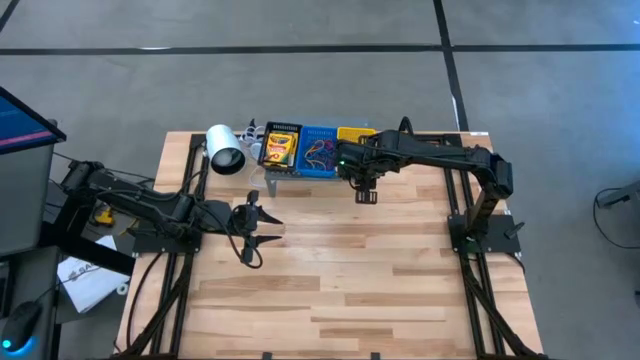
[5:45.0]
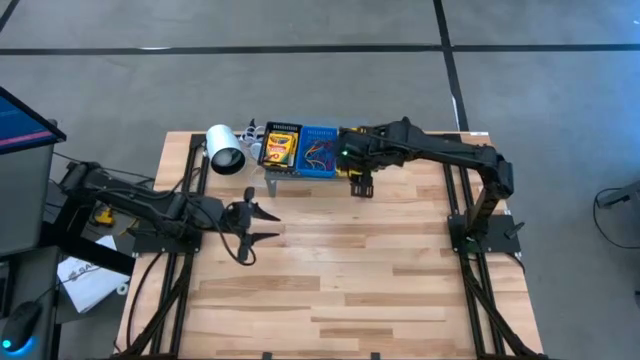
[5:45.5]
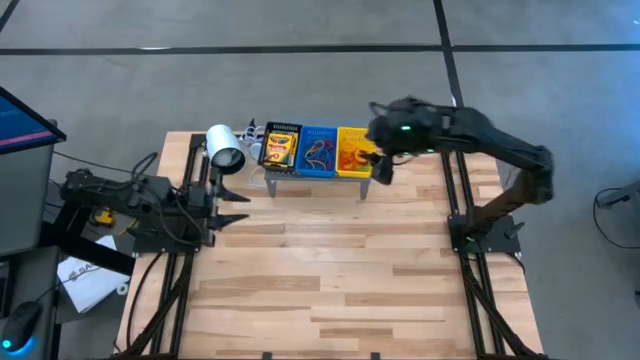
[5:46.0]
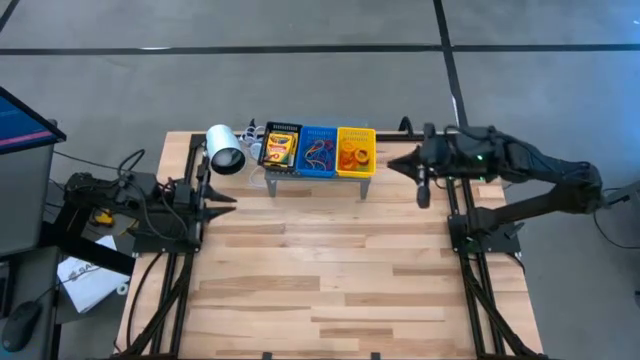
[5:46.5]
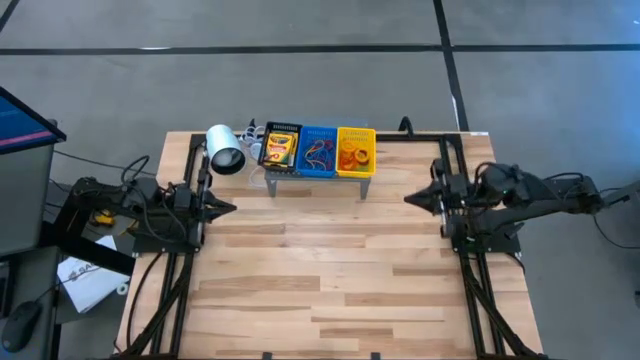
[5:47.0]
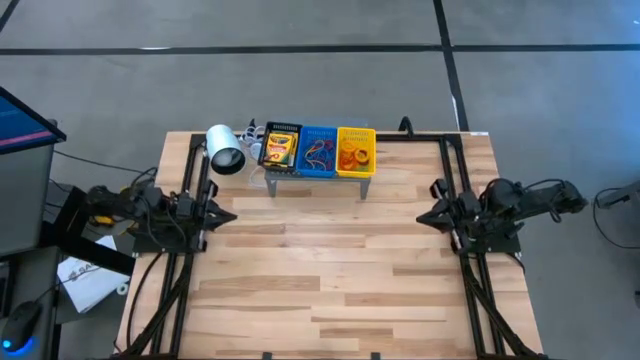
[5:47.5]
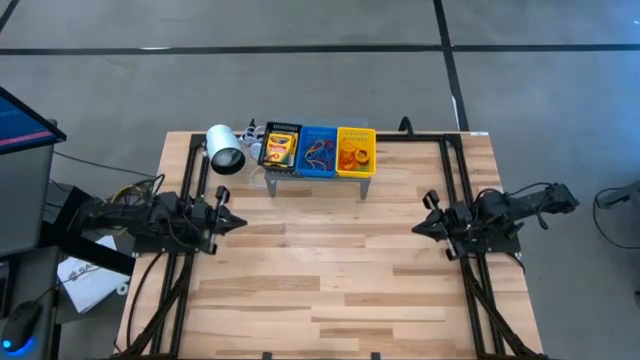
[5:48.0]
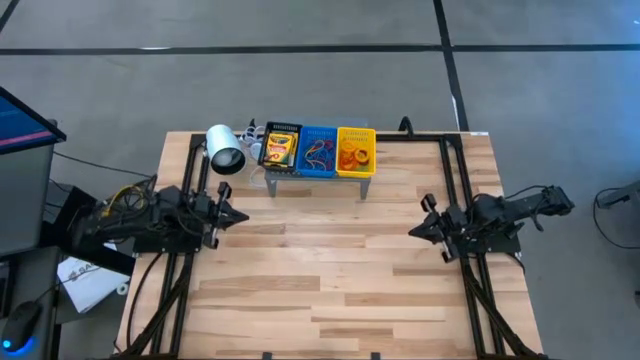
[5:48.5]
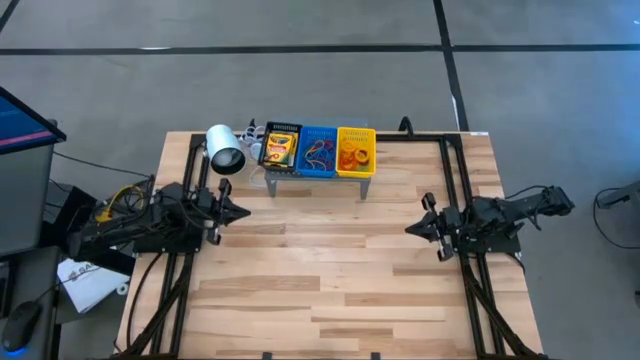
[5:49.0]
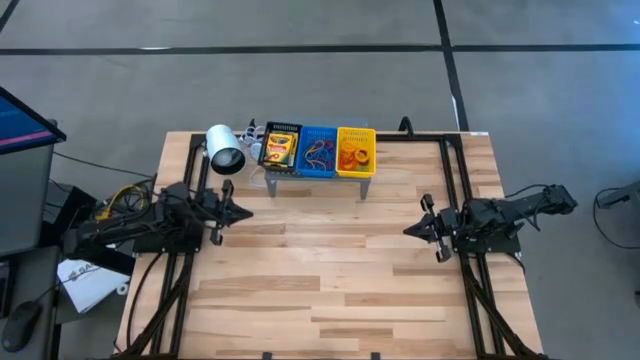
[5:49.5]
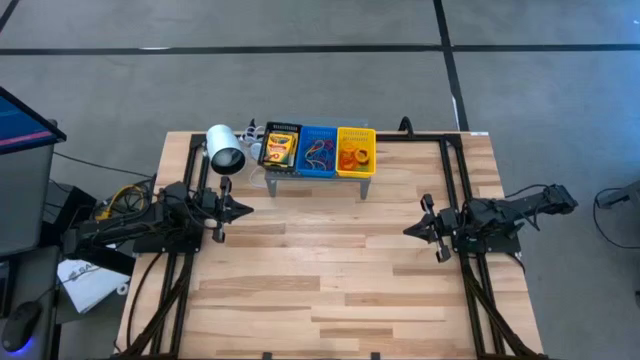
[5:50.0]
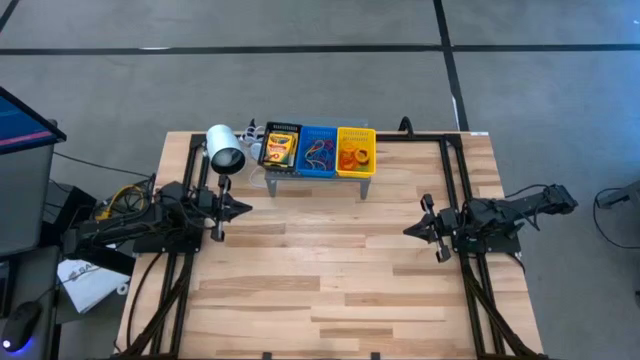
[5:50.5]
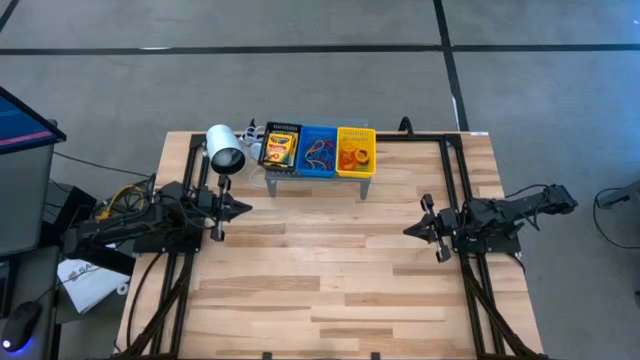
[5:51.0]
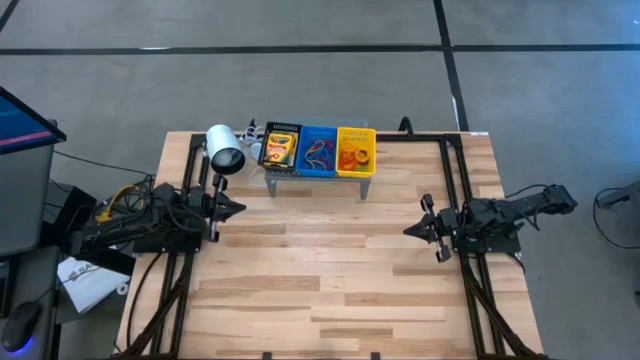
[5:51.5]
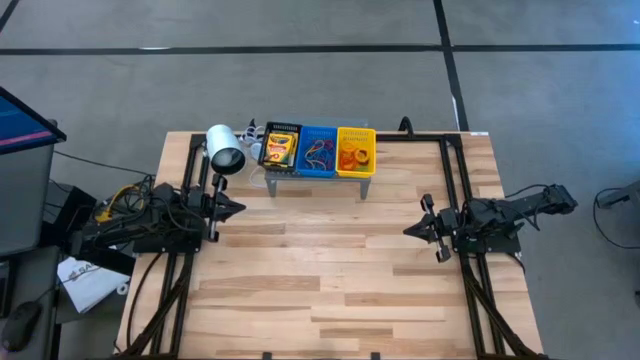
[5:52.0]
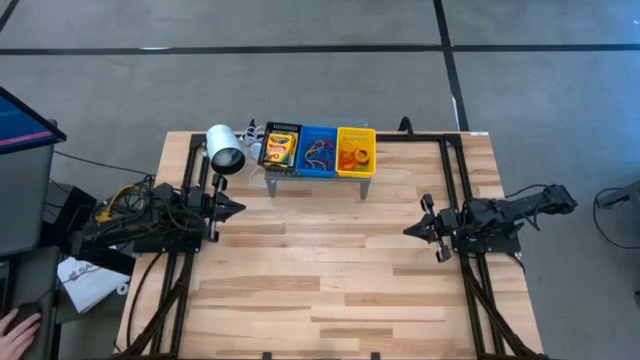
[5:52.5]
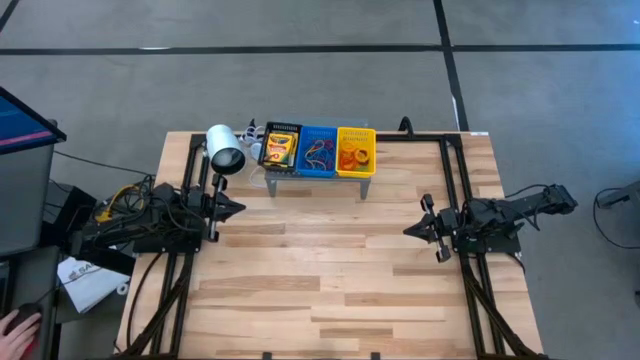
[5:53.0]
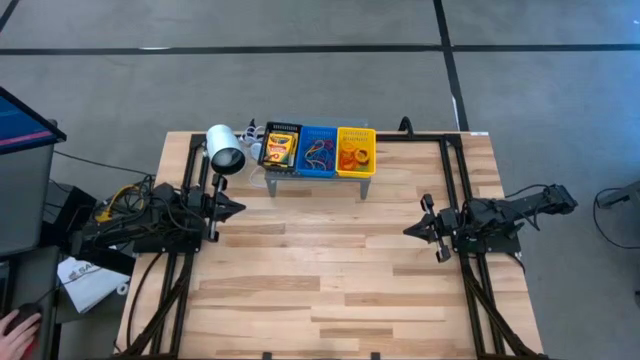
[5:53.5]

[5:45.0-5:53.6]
Task: Pick & Place Office Desk Supplies
Return to Home Position

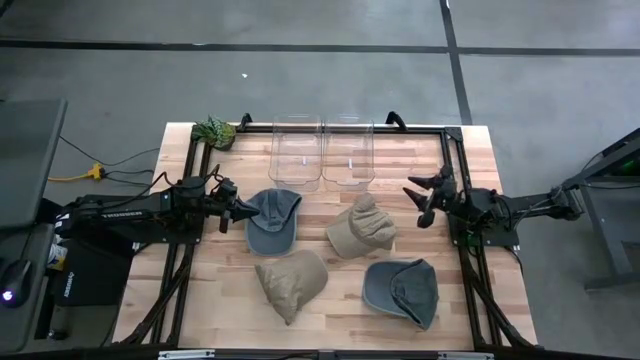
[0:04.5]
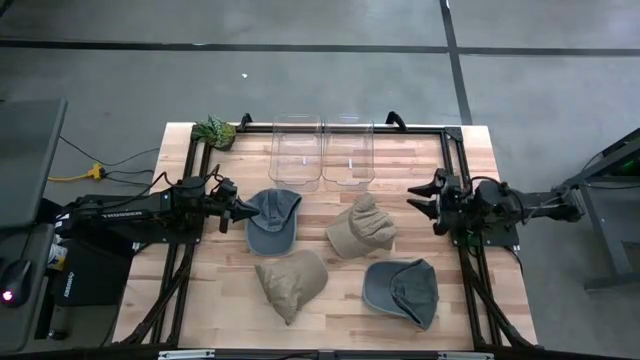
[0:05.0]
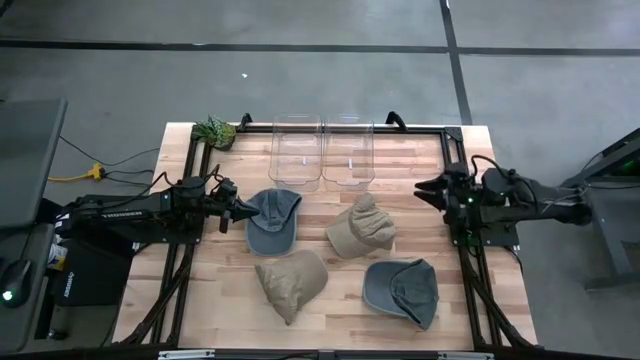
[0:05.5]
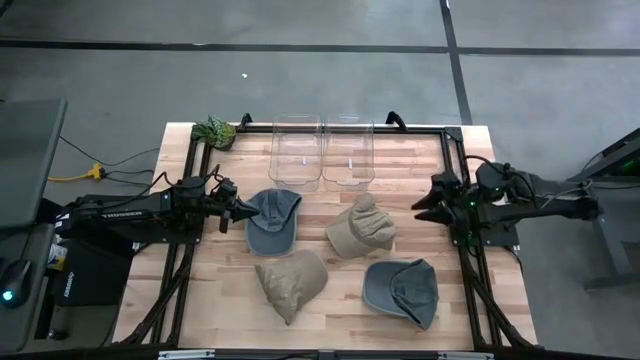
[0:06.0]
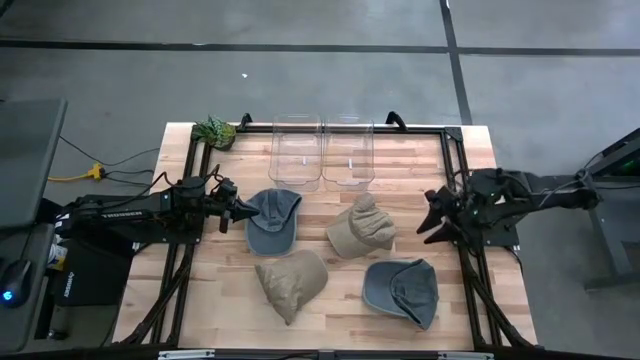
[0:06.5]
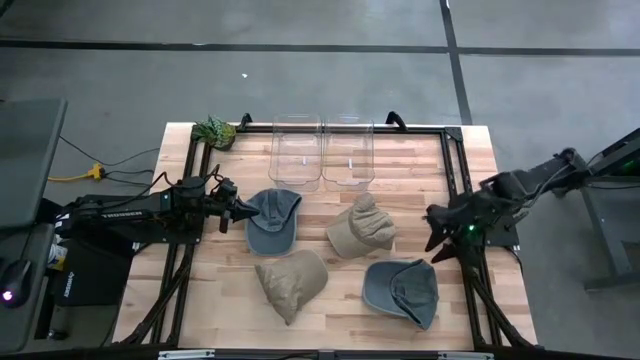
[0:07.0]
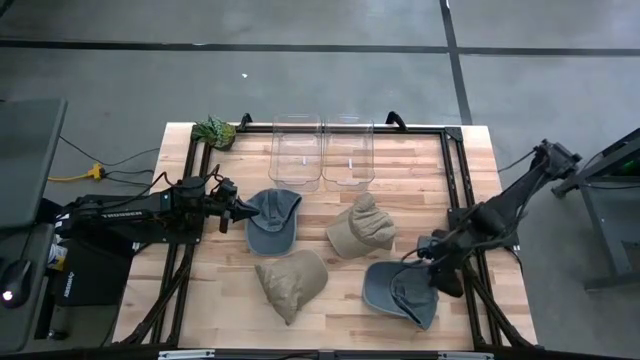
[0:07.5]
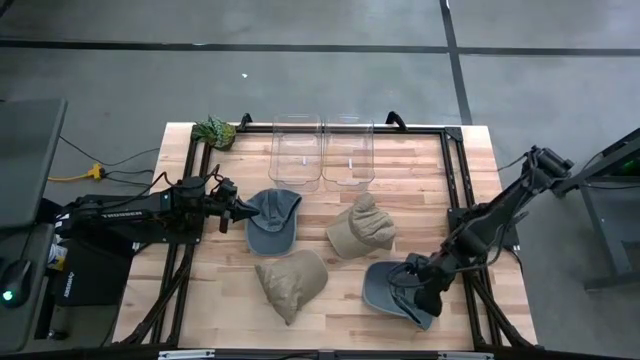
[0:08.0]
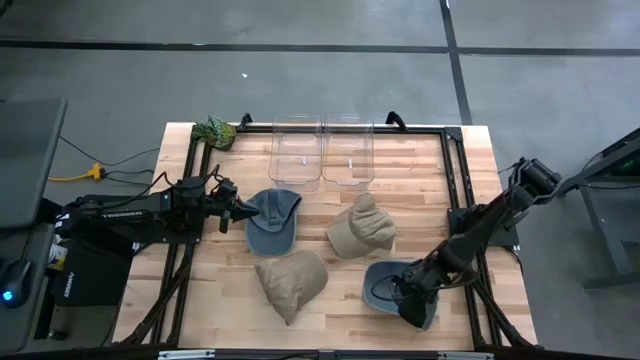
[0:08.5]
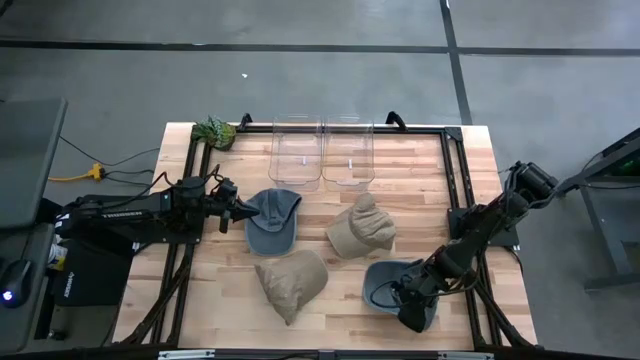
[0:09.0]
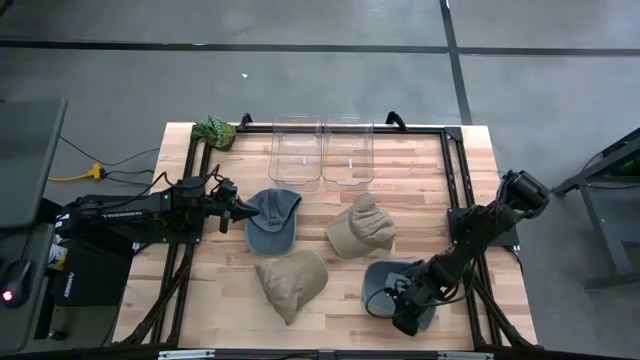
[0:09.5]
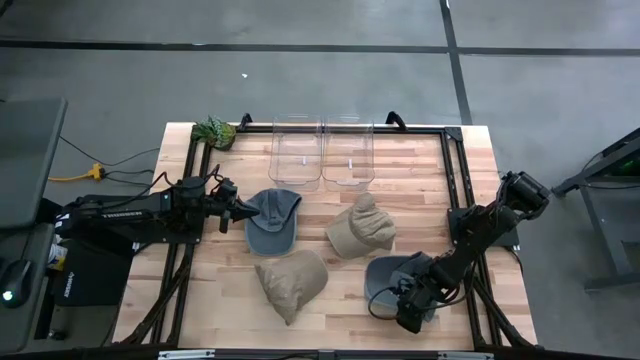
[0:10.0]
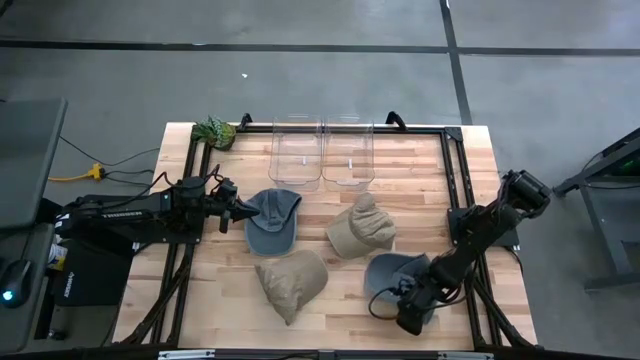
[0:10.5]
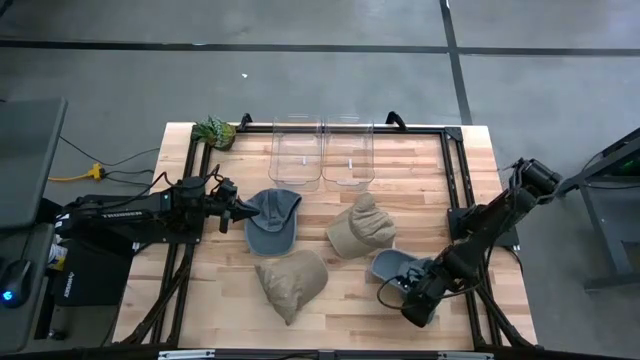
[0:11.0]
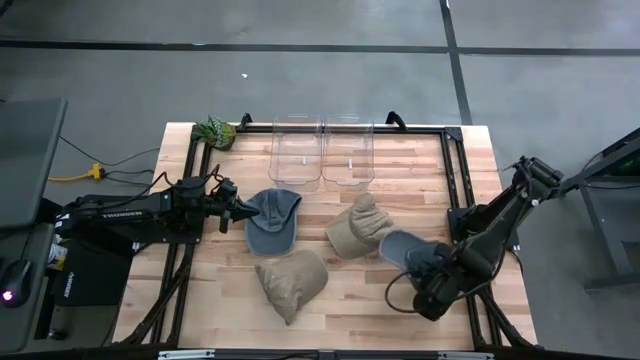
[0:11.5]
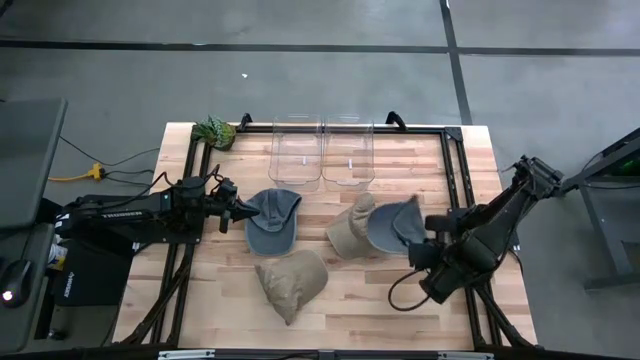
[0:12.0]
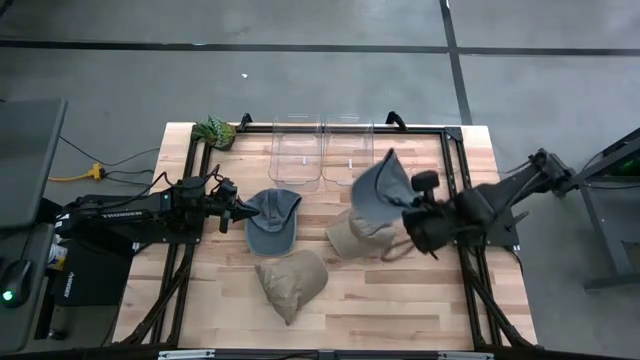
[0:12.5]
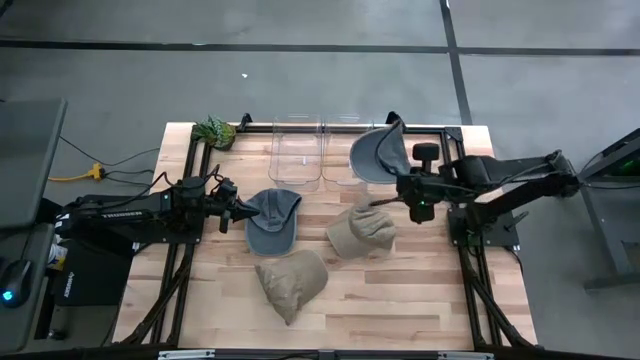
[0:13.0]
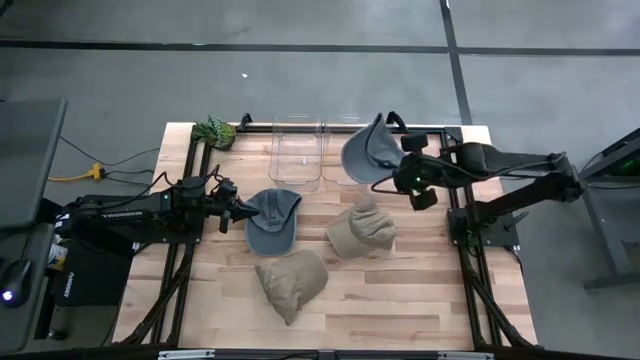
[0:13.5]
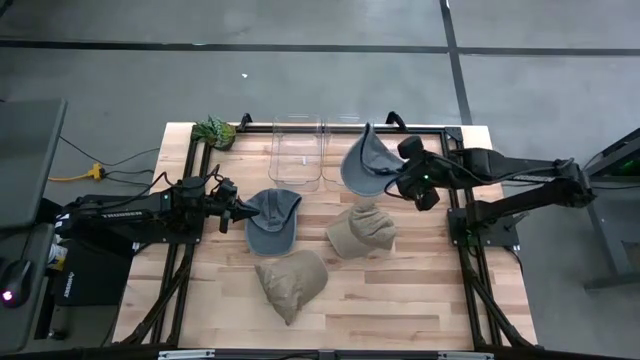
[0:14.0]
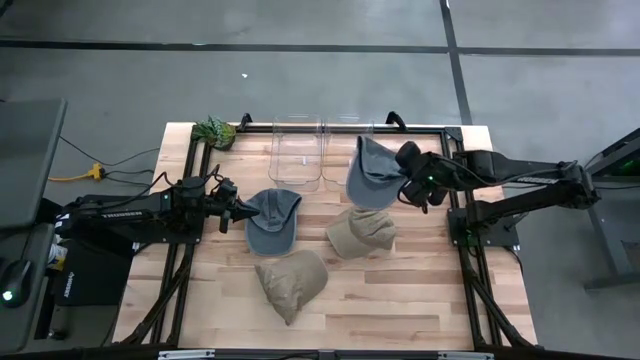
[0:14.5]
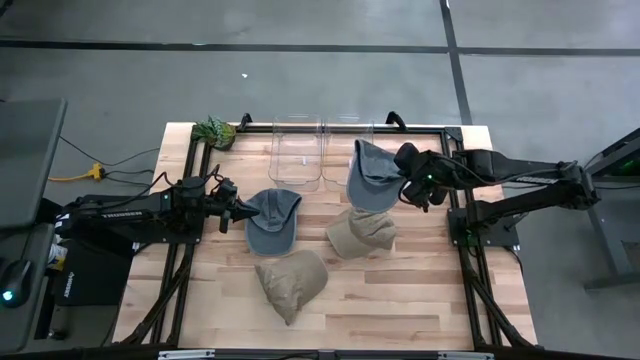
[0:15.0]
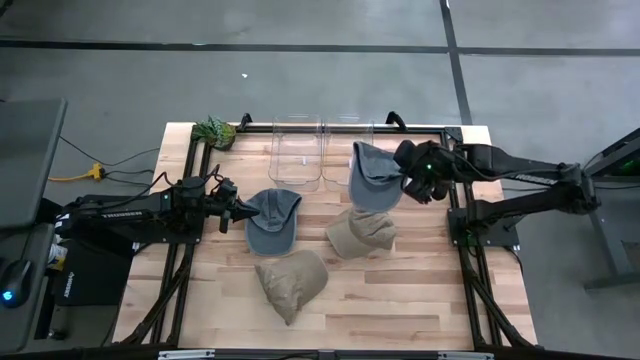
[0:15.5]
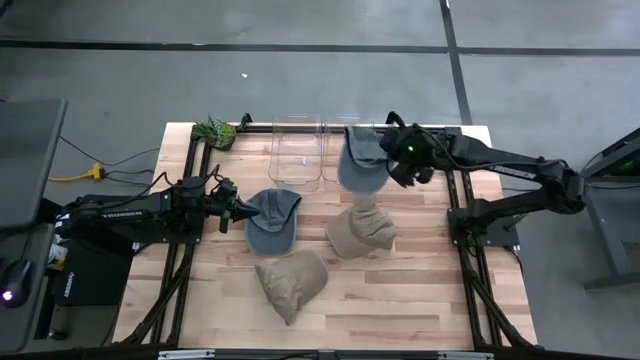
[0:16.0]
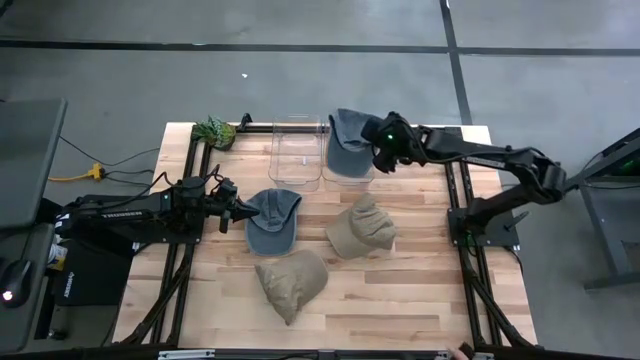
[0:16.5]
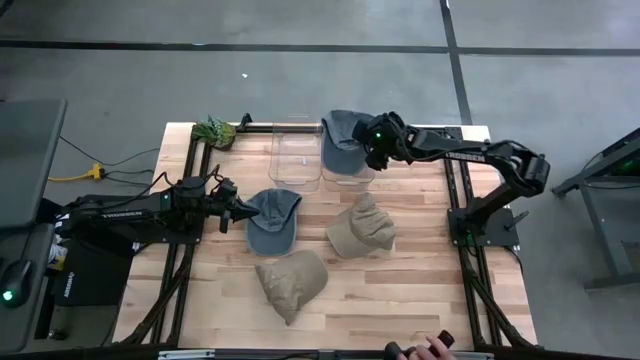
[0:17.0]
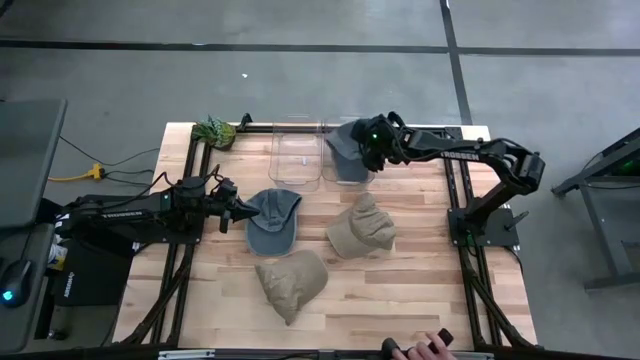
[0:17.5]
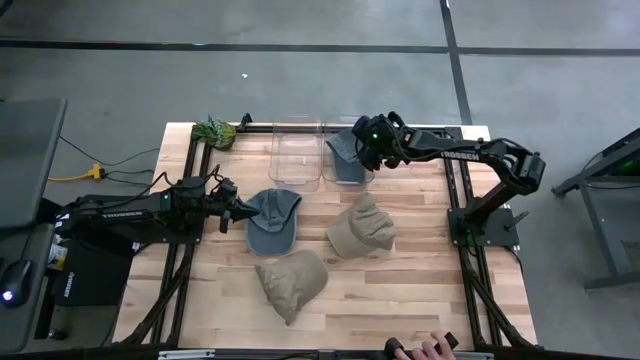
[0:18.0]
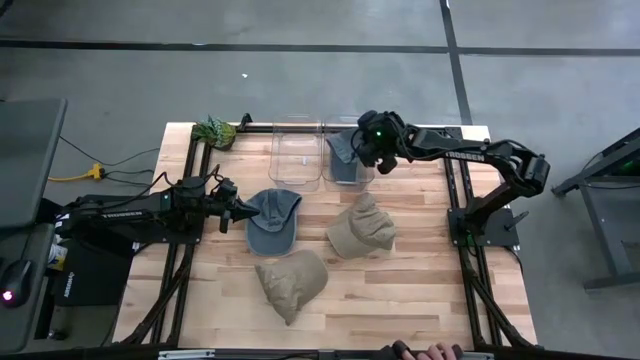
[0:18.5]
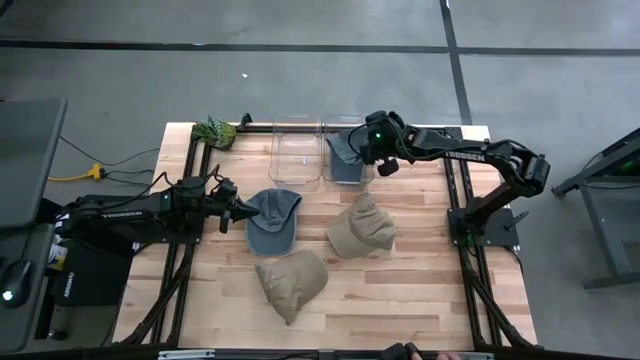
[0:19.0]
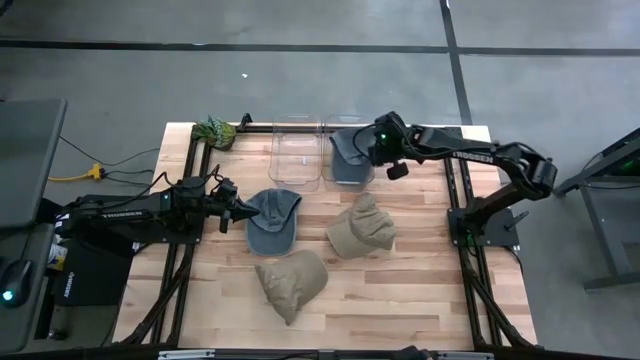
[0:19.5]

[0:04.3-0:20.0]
Task: Pick & Place hat
Put the right blue cap into the right transparent bin
